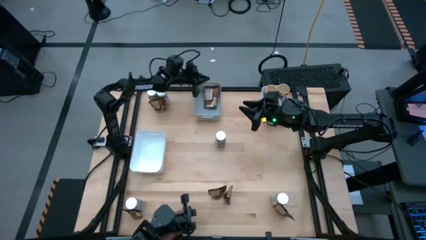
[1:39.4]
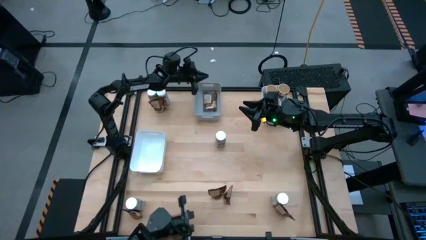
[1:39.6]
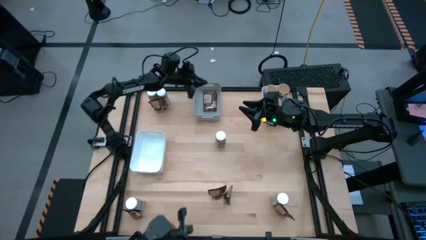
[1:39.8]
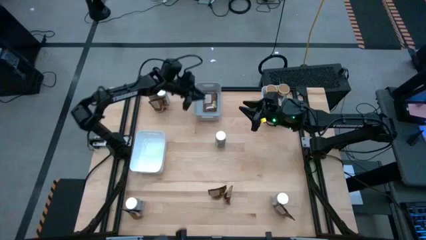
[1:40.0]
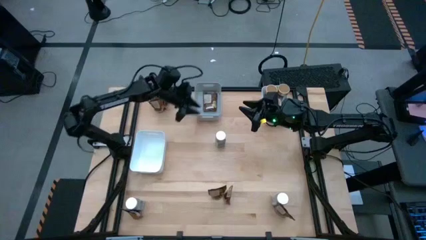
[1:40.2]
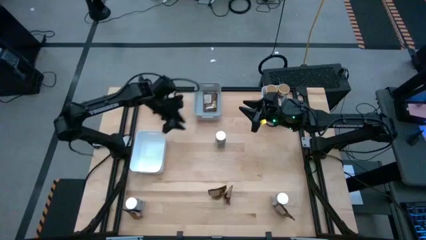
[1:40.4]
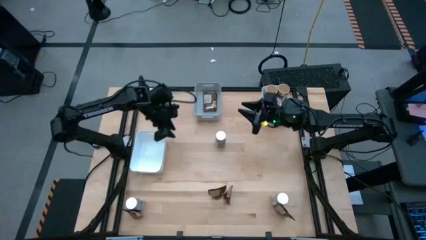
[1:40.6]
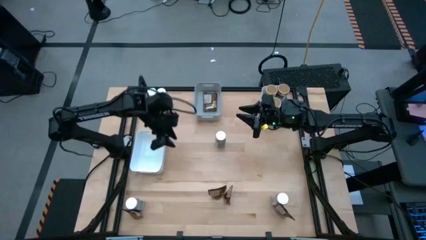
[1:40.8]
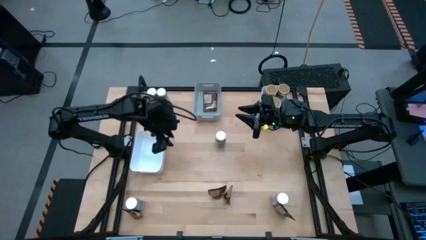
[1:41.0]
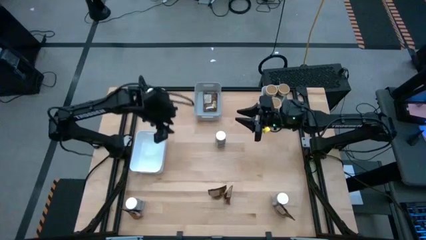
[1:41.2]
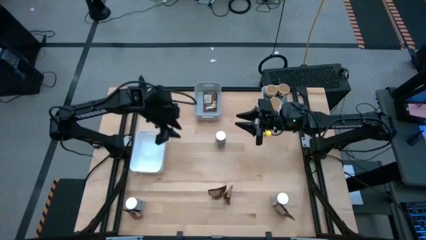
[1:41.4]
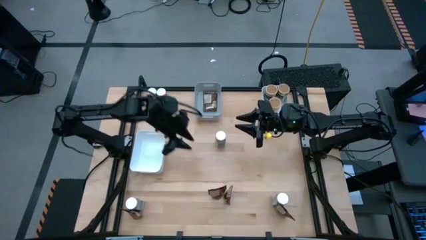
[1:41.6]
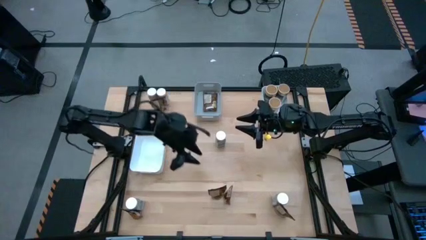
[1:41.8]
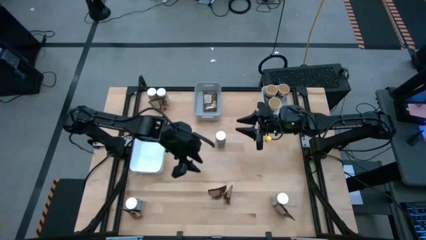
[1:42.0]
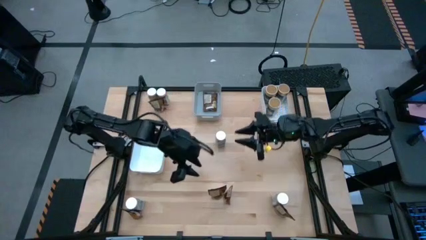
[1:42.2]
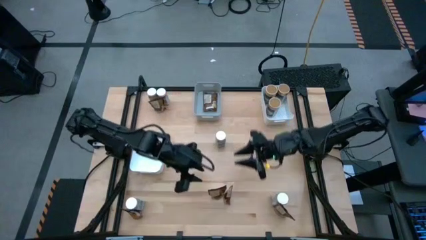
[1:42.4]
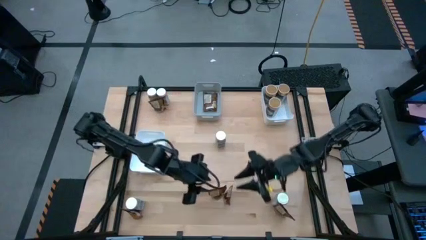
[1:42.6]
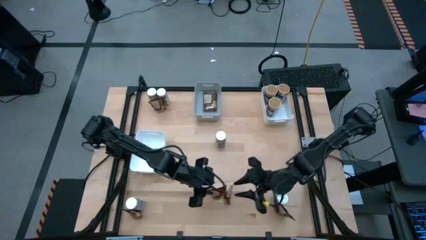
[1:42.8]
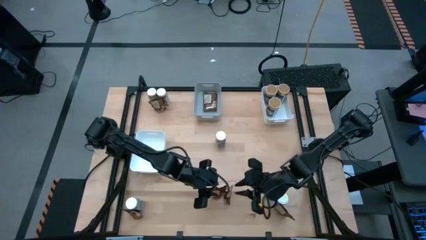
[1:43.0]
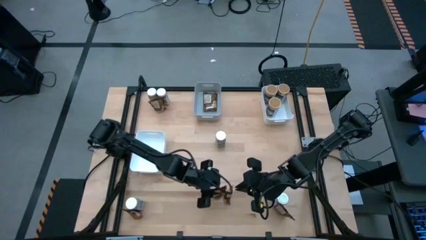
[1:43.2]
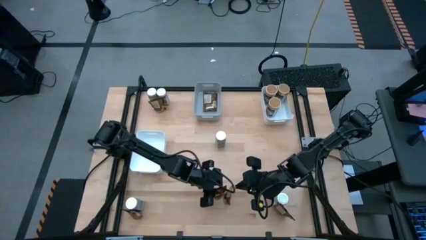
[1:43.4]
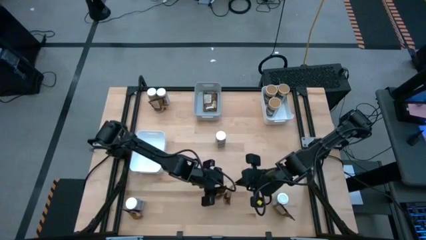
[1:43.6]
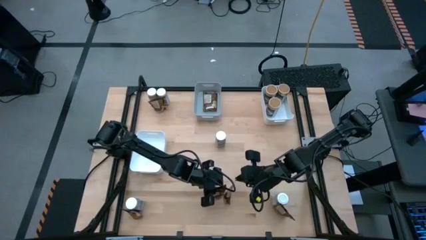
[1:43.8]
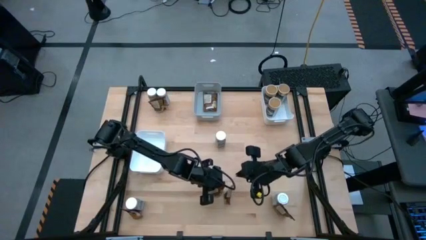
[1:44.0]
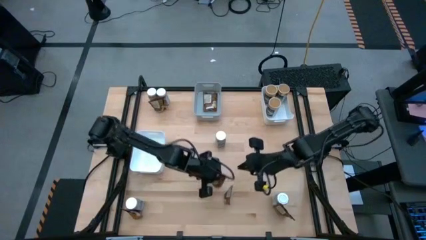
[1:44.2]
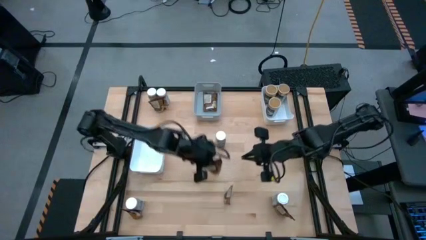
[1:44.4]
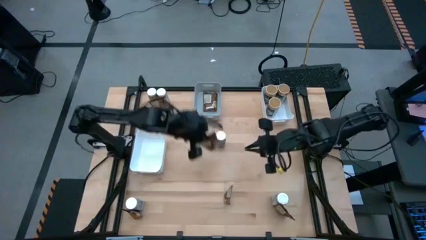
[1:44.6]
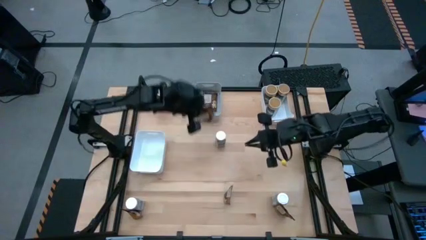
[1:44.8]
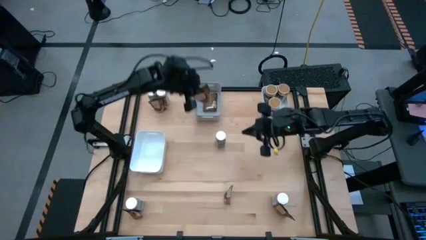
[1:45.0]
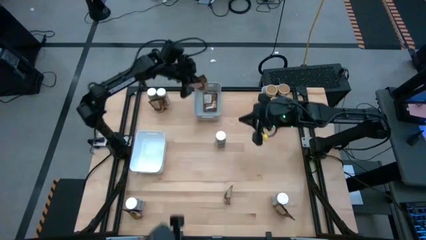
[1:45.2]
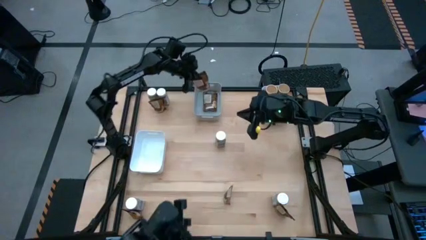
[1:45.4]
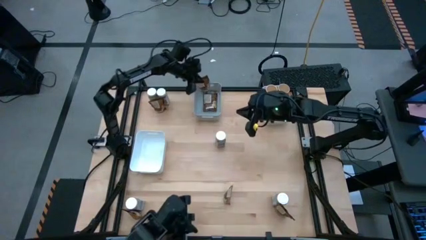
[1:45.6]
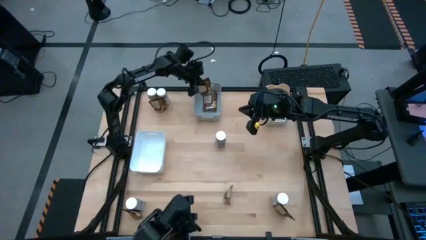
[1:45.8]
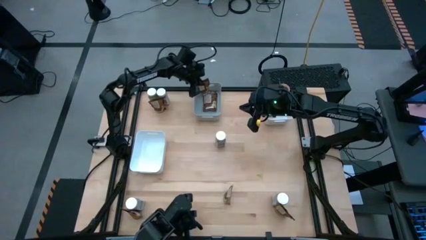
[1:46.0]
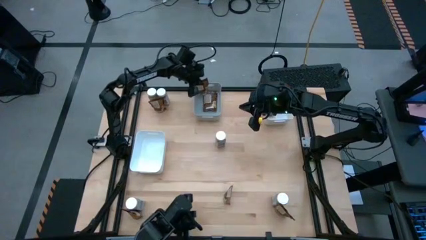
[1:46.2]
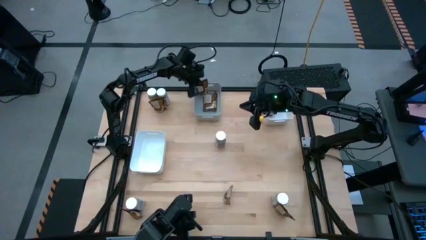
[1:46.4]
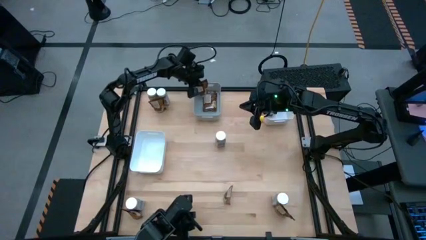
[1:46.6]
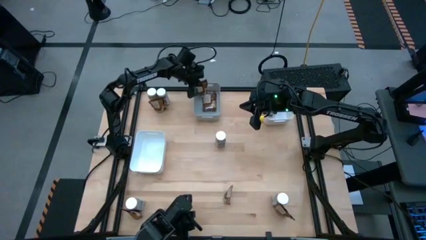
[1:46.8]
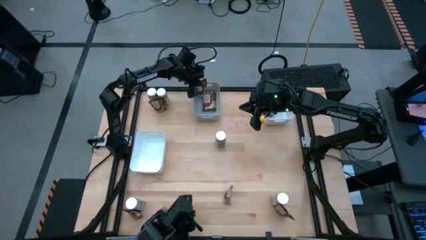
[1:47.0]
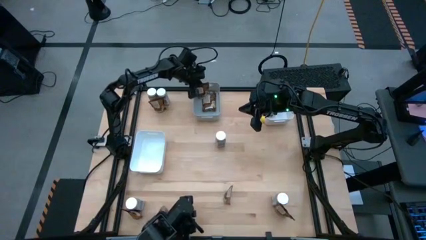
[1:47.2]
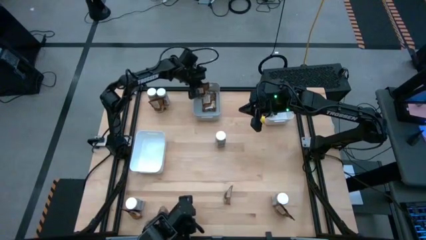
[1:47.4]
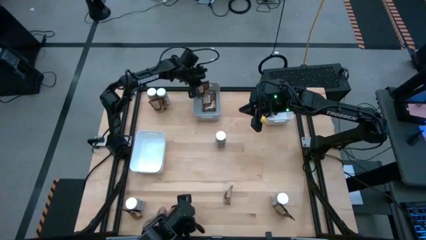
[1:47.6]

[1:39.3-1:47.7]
Task: Sort spices by type
Put the orange spice pack into the gray bin

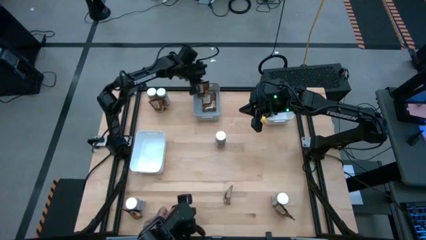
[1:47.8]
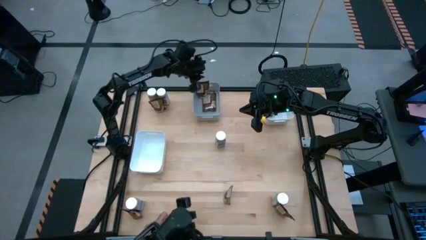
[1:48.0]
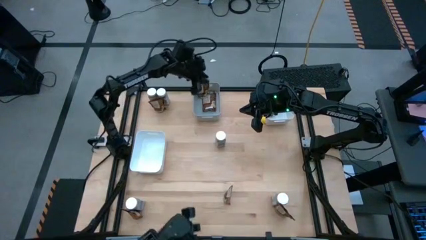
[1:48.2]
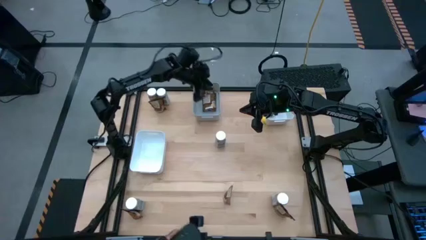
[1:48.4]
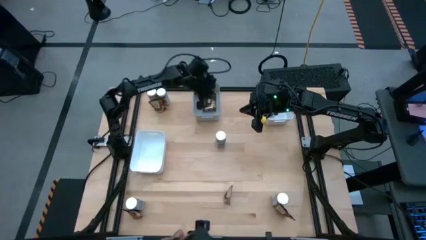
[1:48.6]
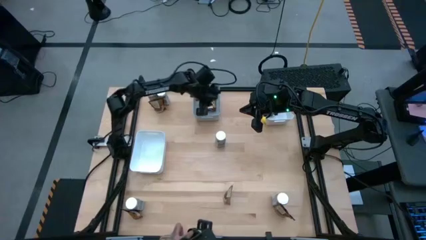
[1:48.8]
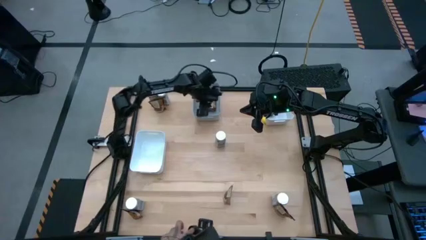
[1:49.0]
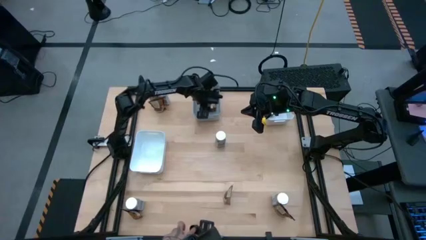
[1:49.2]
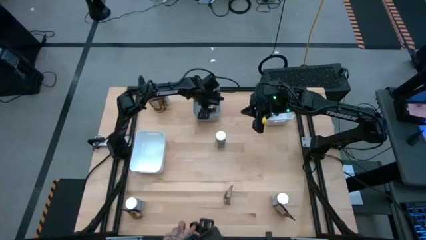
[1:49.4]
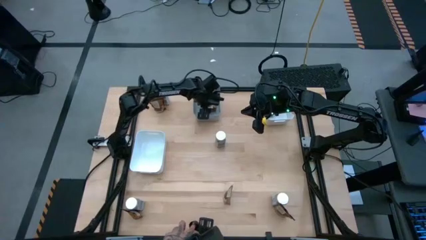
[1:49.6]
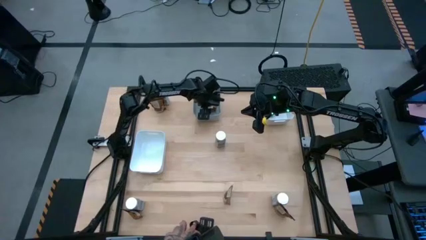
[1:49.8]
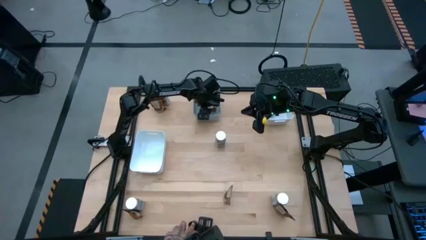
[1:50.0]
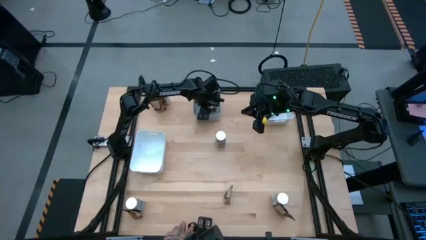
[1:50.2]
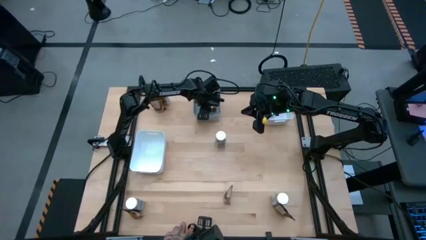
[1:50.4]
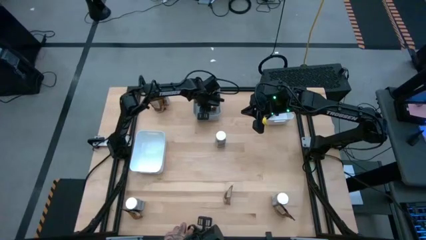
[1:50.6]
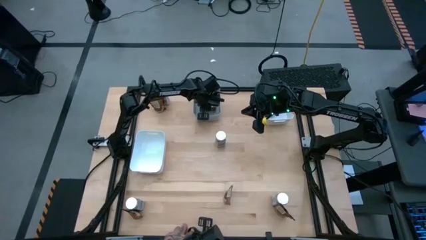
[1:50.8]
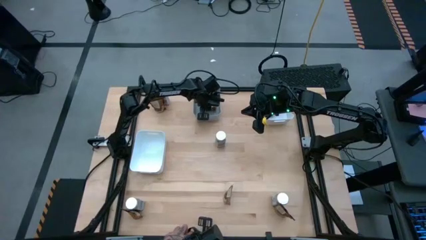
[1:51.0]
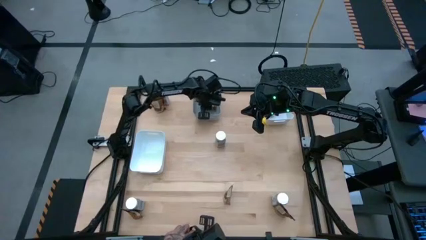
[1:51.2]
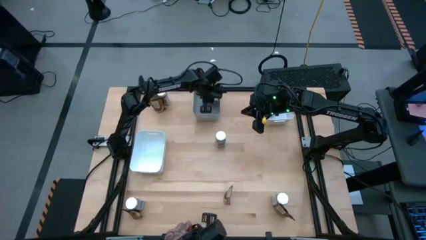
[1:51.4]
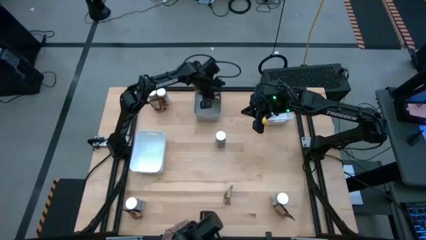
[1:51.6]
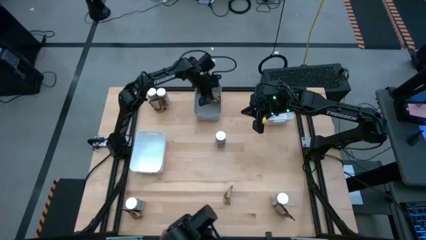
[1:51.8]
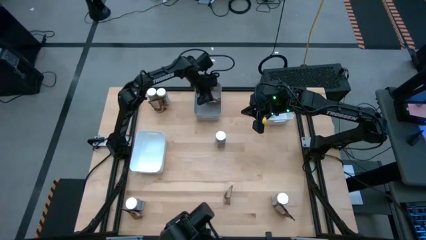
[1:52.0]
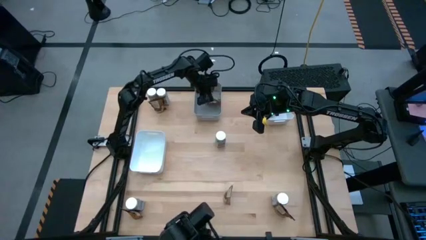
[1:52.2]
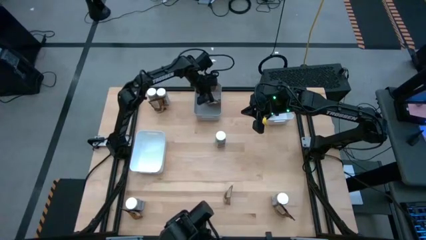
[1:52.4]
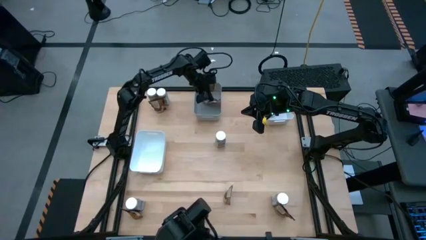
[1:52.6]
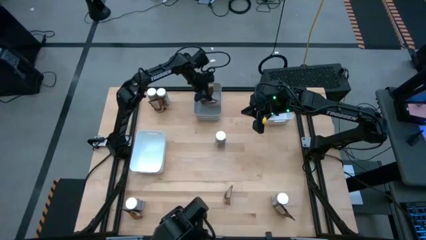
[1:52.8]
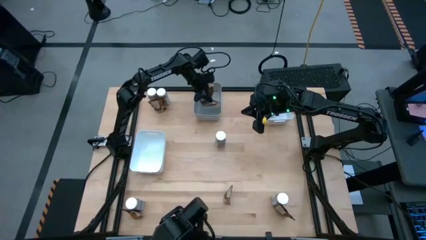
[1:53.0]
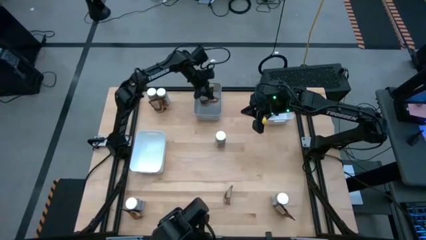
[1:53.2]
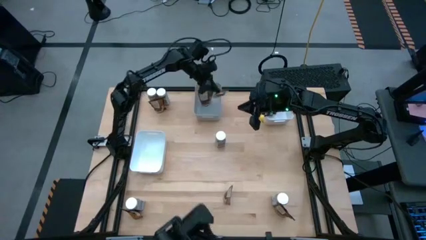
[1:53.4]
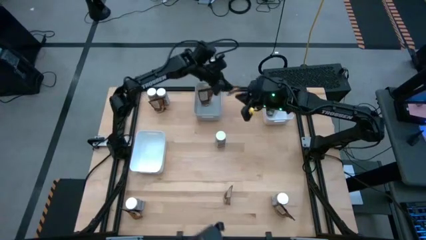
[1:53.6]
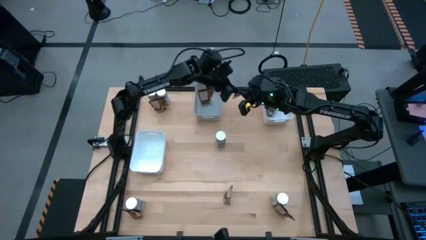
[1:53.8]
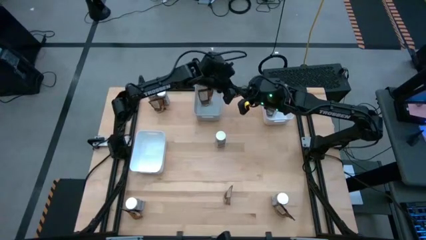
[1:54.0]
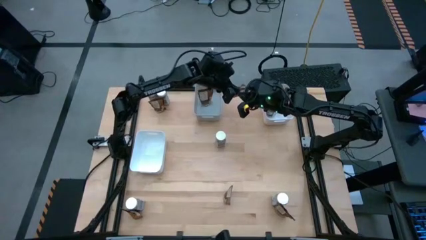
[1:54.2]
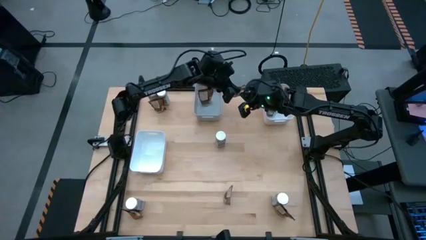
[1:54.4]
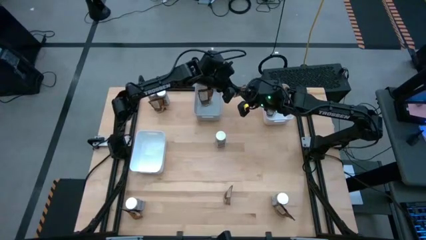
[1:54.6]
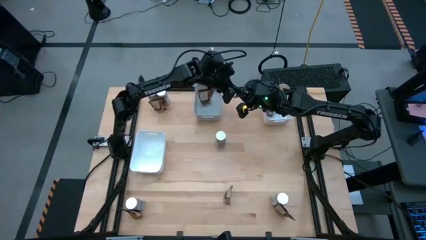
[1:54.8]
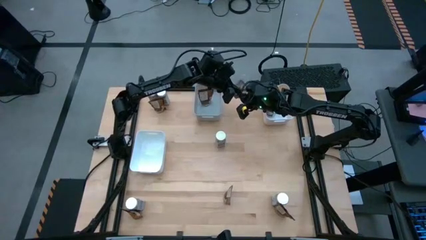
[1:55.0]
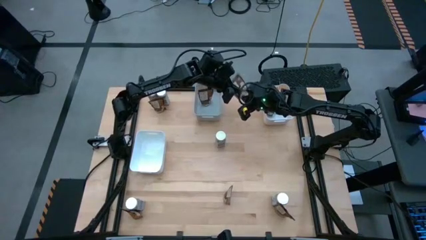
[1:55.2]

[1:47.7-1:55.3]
Adjust the orange spice pack
